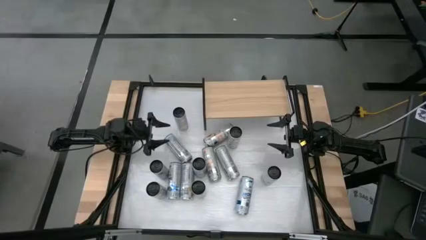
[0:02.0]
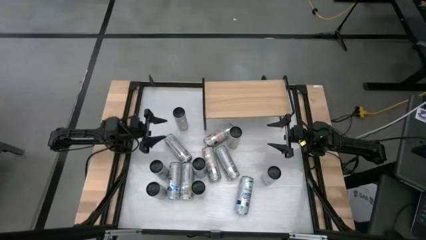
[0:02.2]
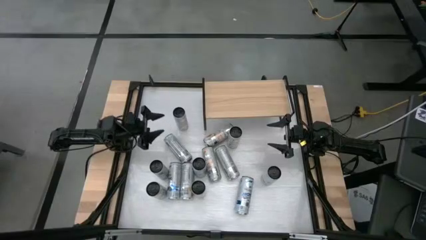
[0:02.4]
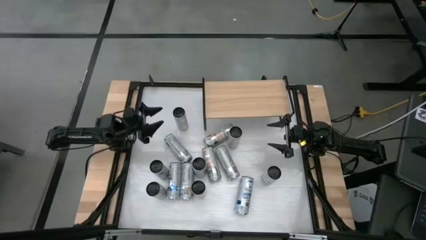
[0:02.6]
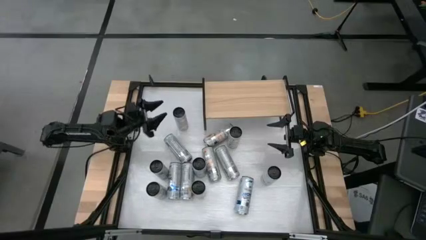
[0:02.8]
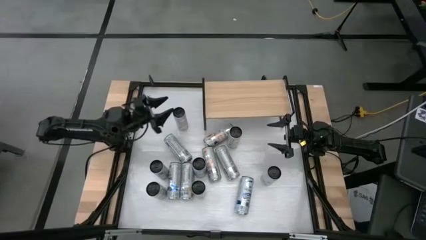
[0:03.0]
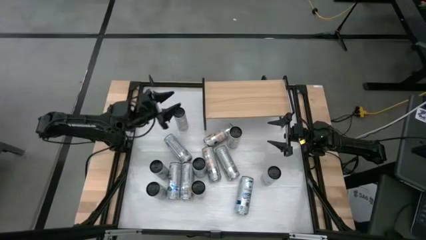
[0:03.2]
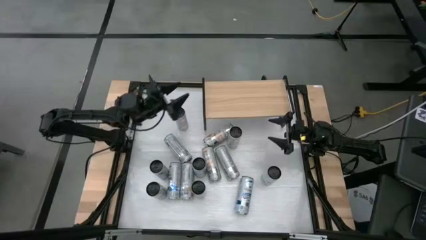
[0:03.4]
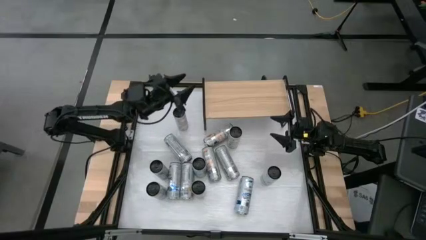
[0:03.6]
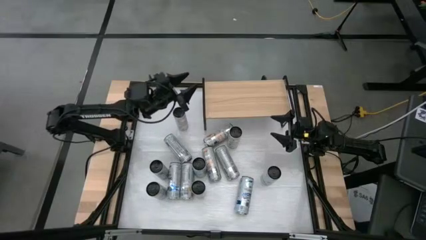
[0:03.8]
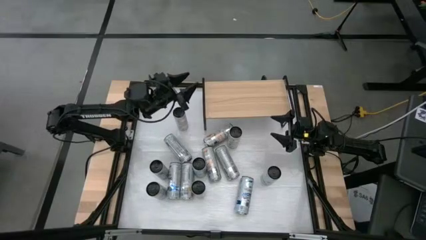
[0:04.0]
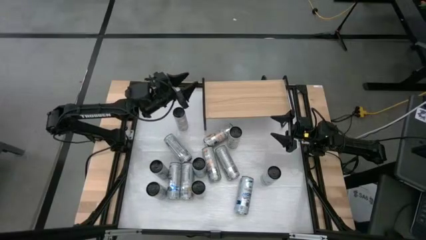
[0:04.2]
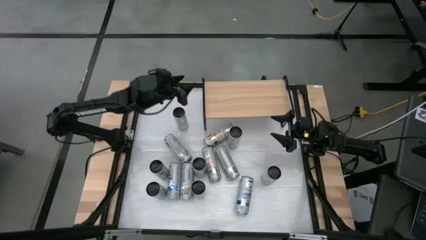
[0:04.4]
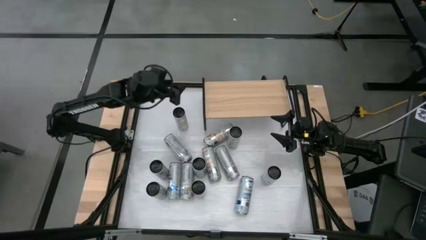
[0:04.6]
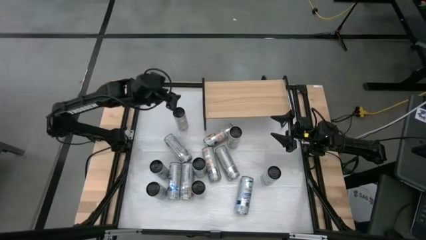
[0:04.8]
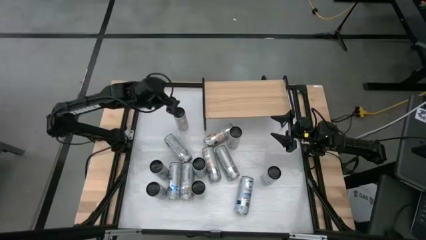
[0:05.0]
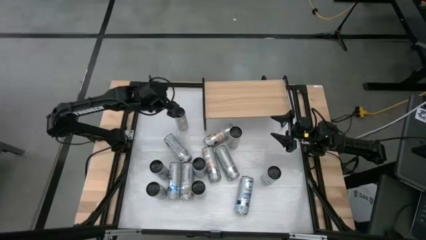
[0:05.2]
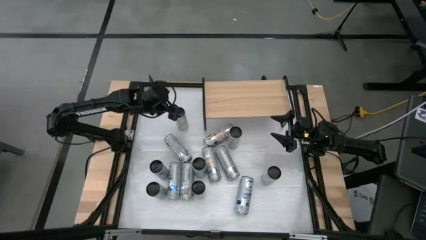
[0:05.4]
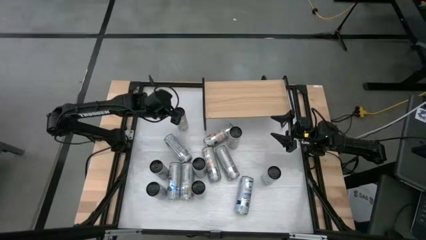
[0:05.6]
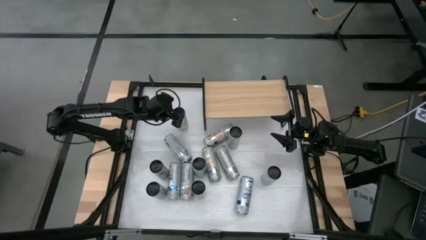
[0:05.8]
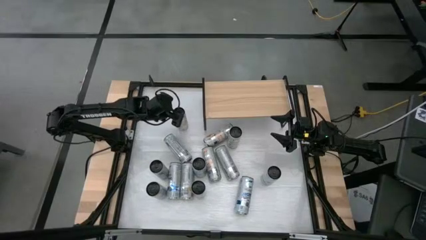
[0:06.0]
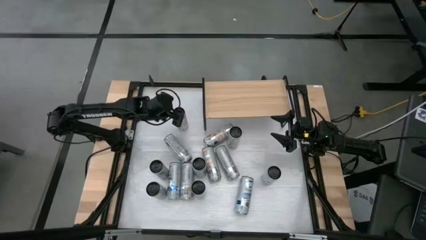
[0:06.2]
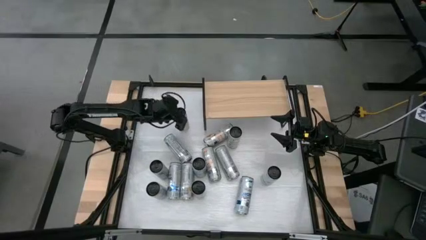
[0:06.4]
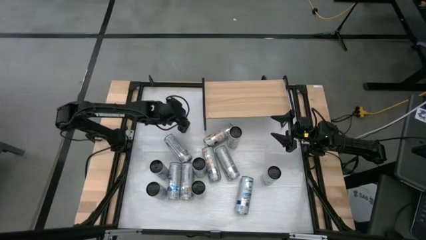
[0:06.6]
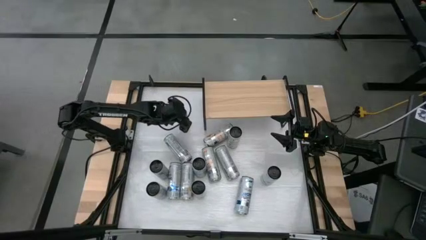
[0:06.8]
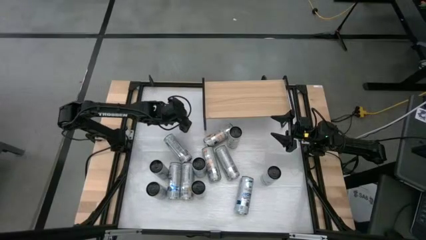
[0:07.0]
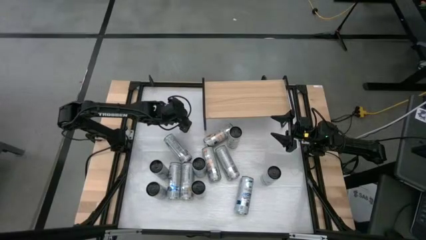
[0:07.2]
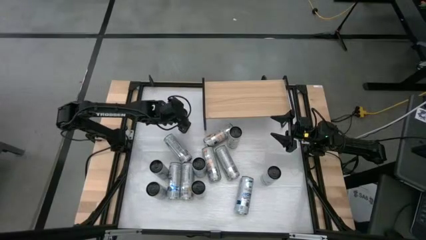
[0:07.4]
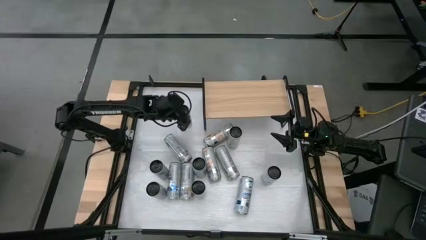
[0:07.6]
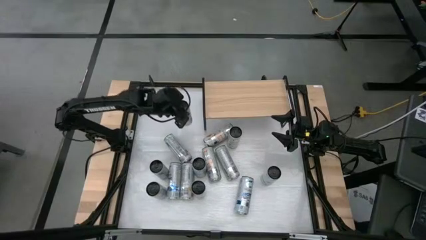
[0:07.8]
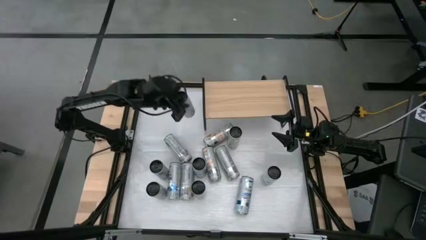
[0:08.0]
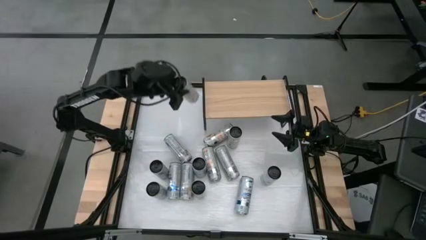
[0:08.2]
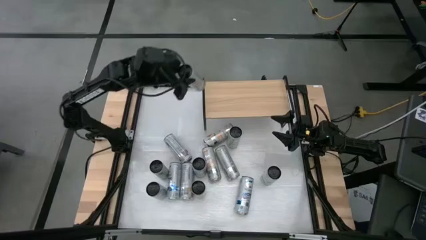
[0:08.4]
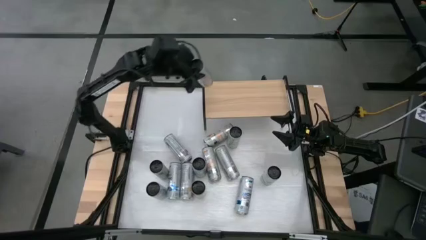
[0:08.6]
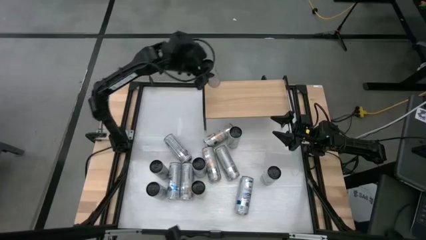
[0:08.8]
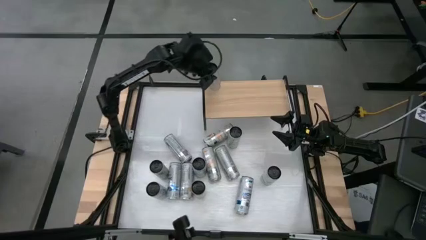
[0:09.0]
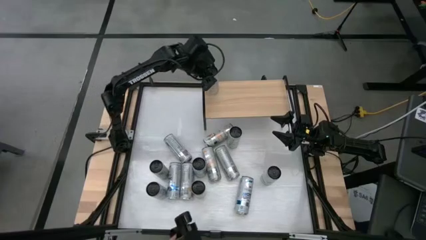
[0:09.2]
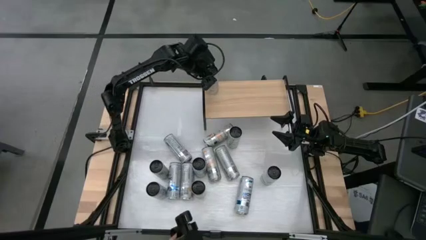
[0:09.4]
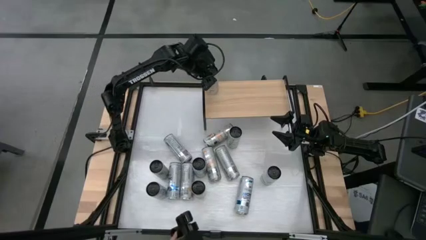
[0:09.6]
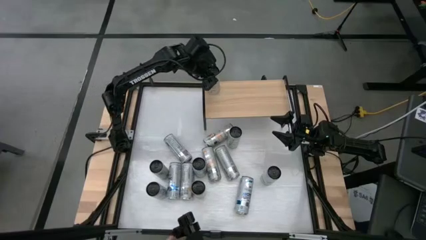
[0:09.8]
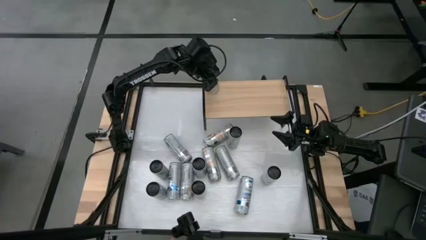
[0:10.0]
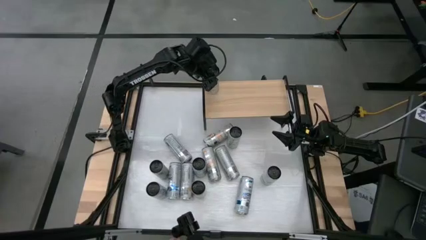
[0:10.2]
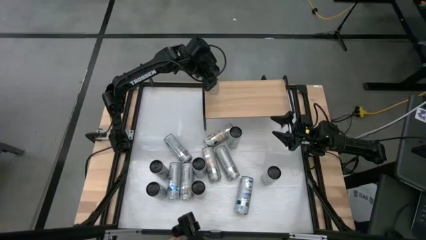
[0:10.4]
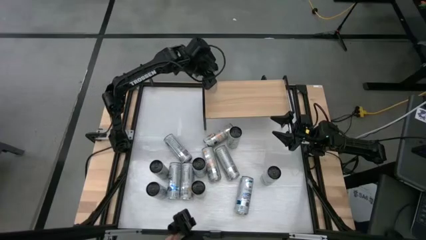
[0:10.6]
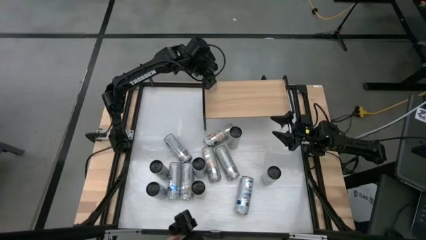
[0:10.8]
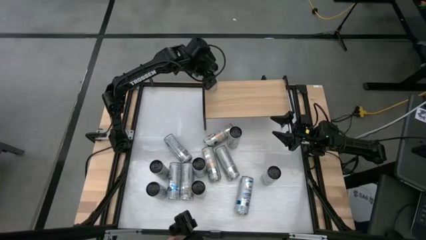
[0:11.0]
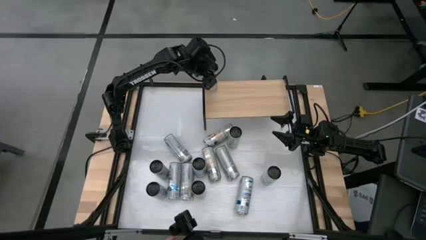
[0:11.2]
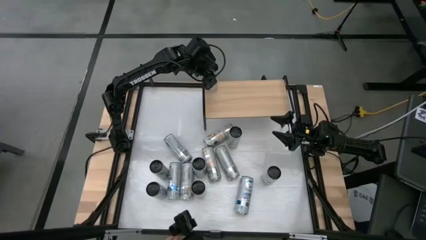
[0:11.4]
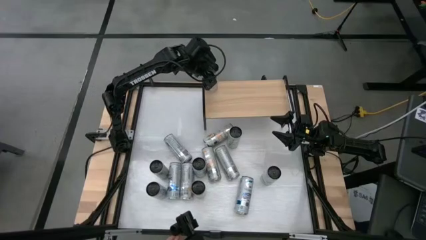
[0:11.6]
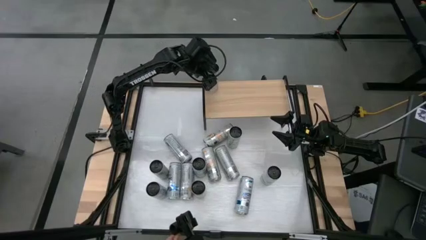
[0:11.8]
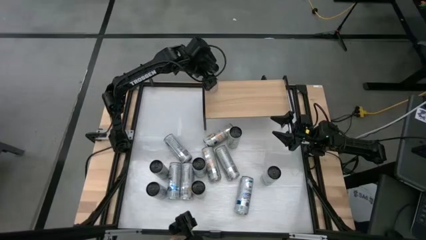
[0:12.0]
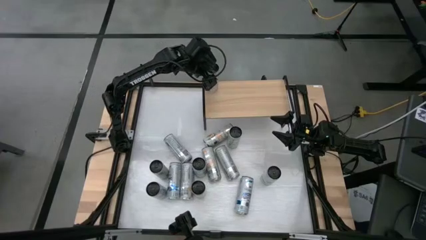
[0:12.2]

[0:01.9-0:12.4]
Task: Place canned beverage on shelf
Put the orange soda can on the shelf
